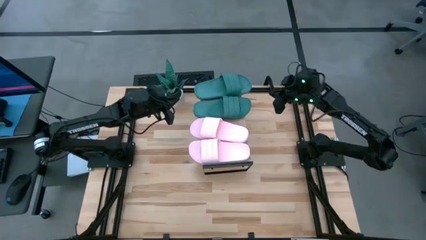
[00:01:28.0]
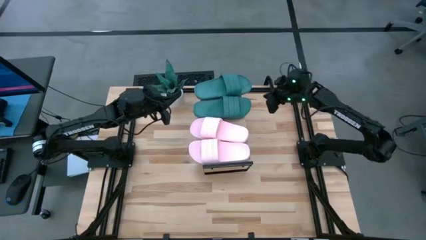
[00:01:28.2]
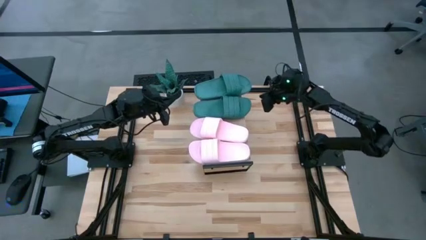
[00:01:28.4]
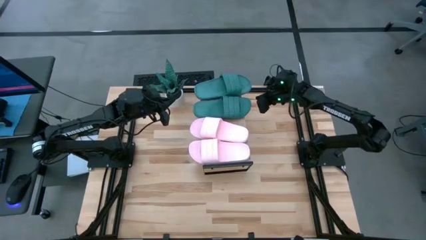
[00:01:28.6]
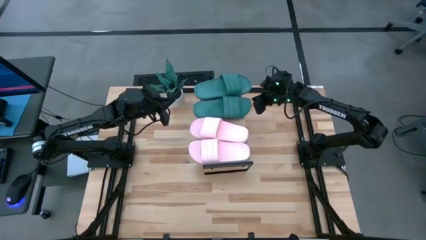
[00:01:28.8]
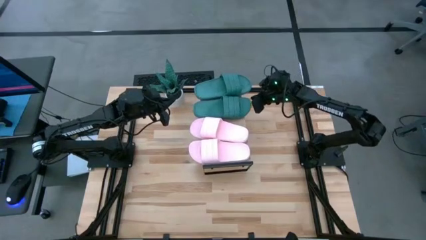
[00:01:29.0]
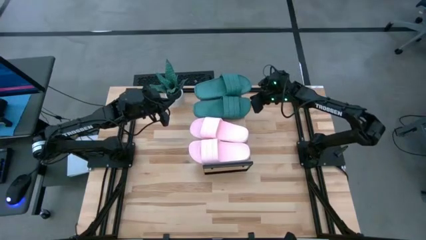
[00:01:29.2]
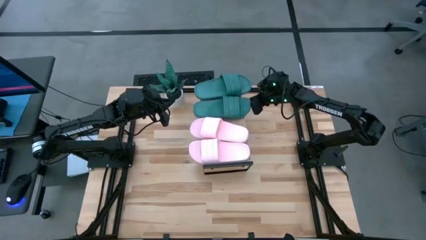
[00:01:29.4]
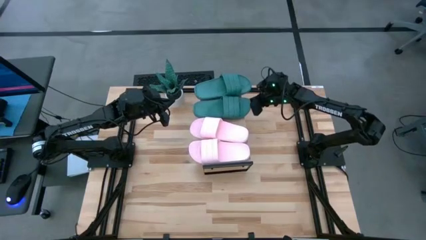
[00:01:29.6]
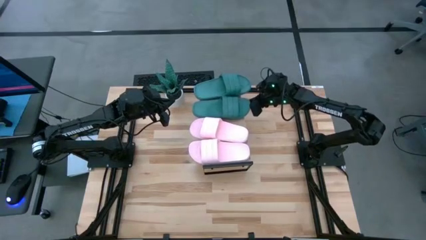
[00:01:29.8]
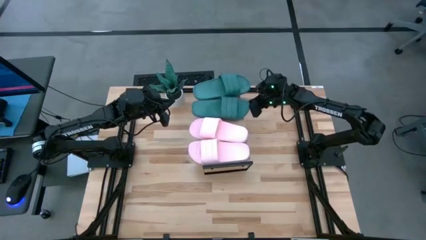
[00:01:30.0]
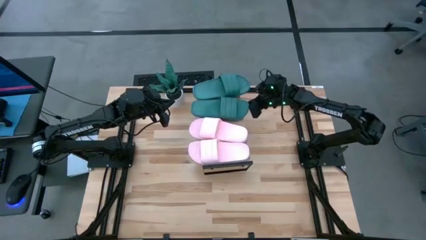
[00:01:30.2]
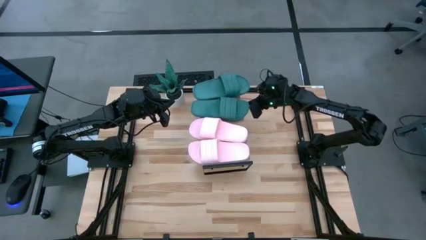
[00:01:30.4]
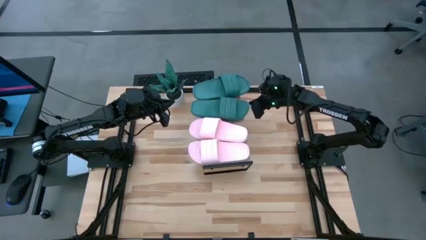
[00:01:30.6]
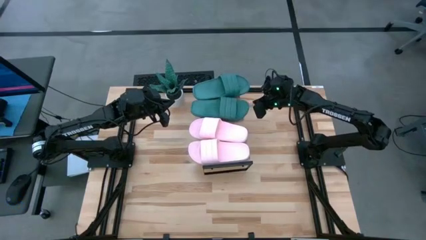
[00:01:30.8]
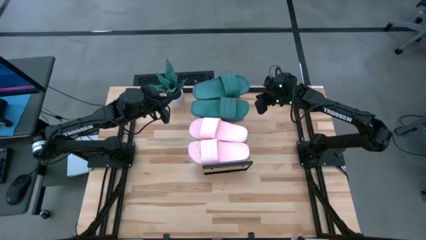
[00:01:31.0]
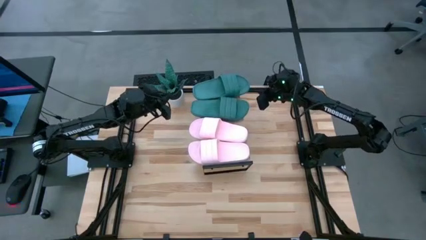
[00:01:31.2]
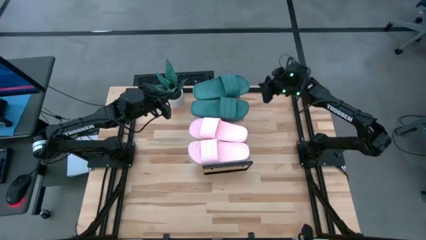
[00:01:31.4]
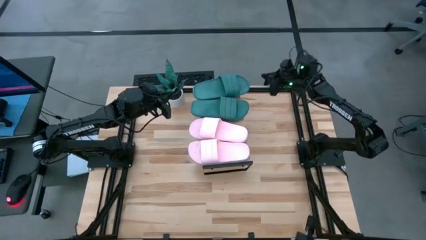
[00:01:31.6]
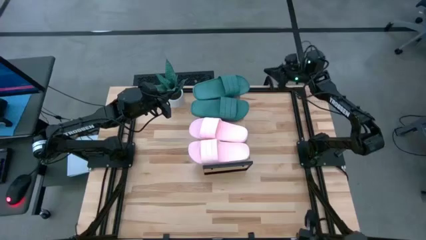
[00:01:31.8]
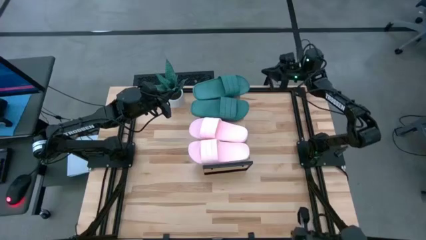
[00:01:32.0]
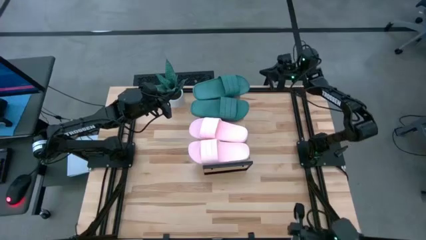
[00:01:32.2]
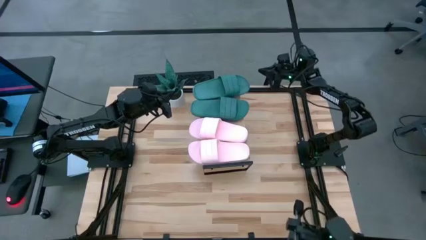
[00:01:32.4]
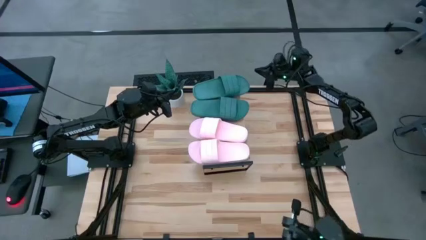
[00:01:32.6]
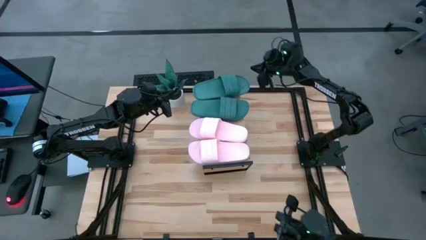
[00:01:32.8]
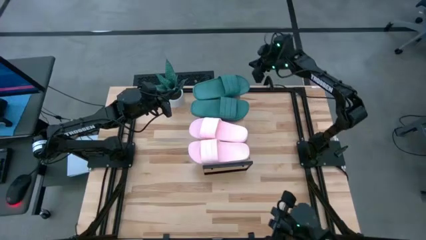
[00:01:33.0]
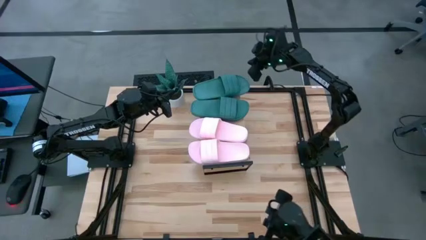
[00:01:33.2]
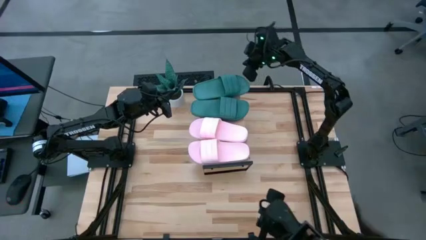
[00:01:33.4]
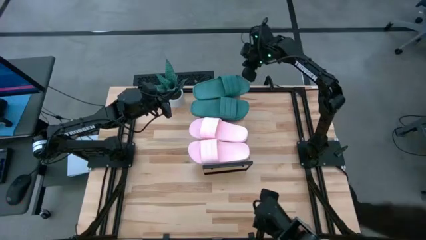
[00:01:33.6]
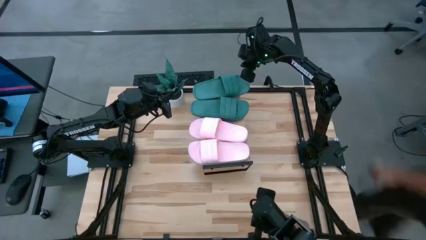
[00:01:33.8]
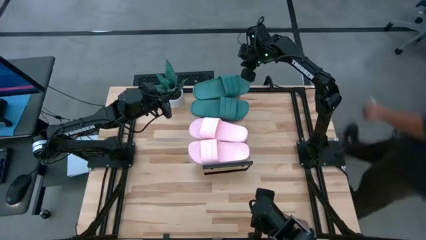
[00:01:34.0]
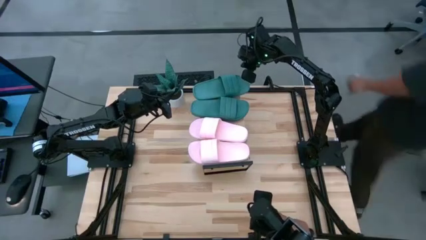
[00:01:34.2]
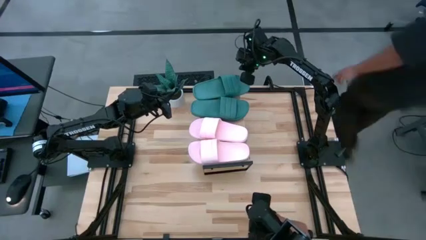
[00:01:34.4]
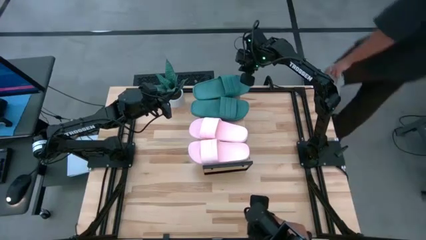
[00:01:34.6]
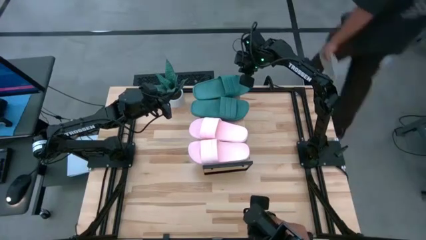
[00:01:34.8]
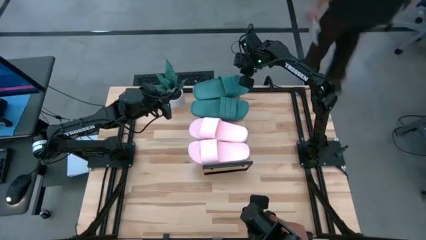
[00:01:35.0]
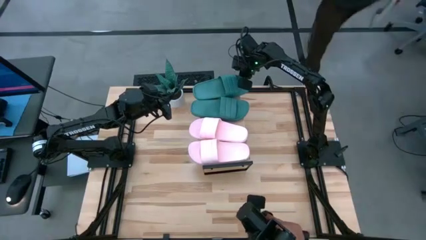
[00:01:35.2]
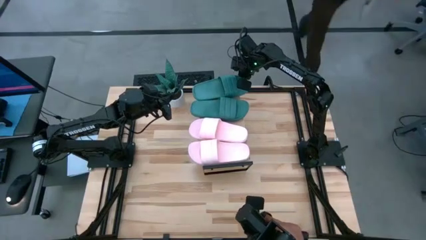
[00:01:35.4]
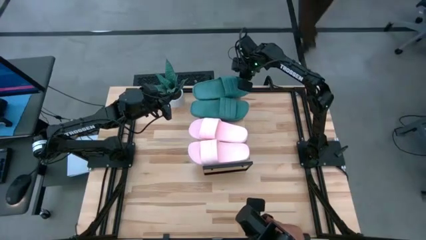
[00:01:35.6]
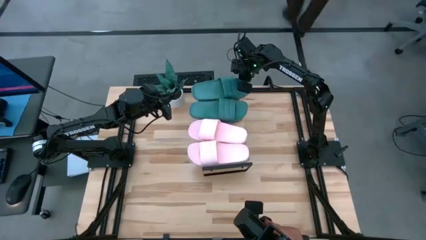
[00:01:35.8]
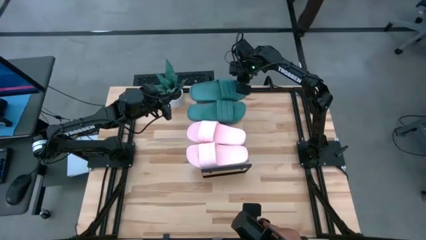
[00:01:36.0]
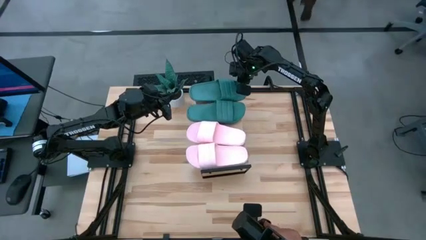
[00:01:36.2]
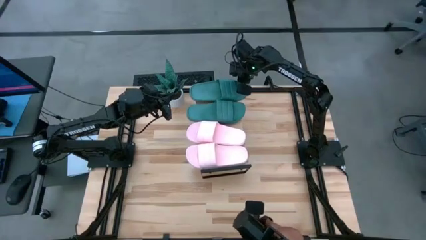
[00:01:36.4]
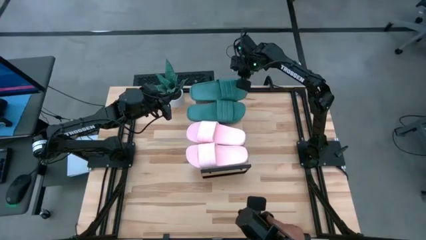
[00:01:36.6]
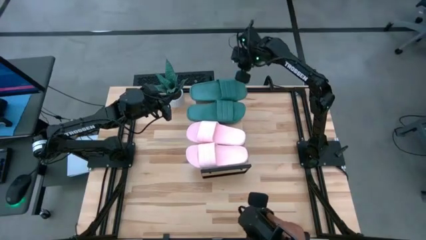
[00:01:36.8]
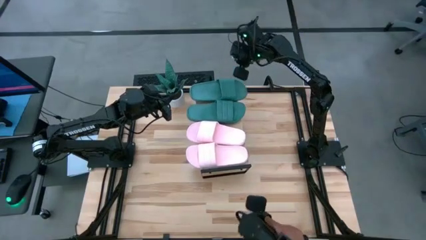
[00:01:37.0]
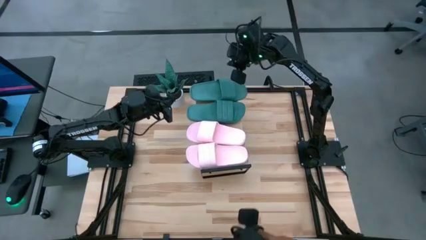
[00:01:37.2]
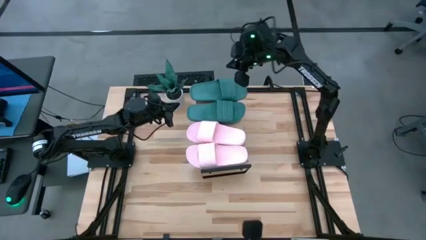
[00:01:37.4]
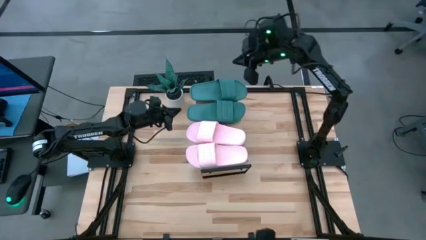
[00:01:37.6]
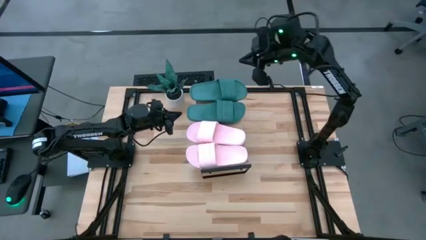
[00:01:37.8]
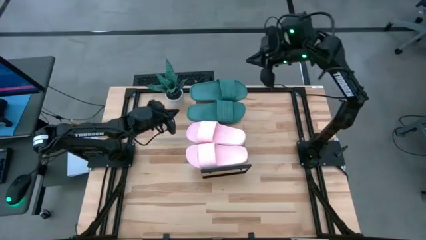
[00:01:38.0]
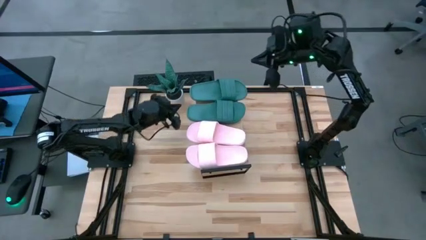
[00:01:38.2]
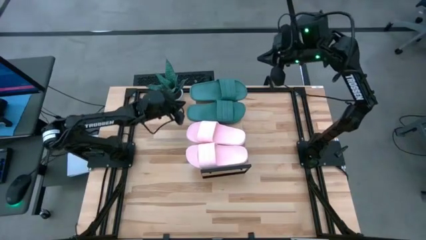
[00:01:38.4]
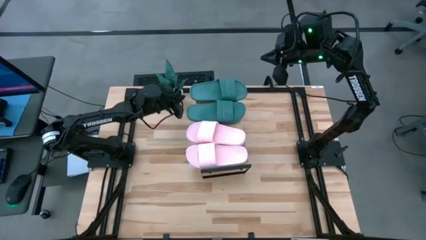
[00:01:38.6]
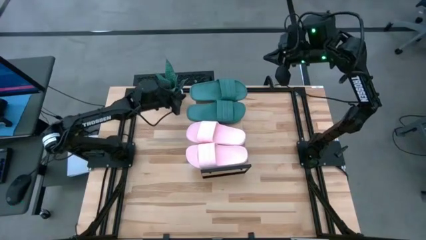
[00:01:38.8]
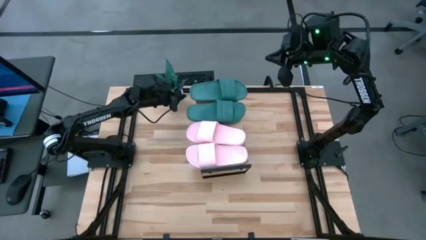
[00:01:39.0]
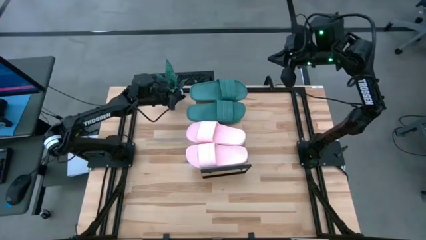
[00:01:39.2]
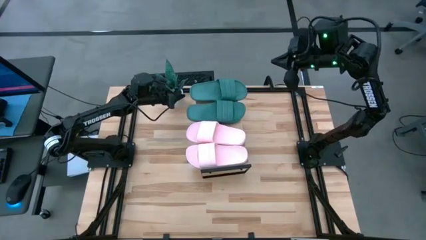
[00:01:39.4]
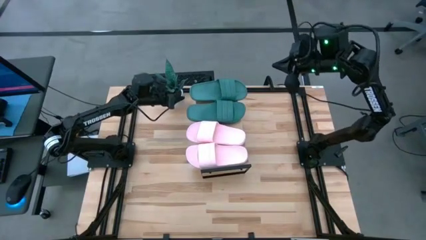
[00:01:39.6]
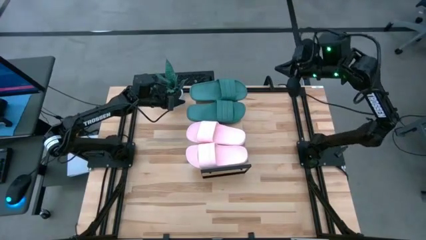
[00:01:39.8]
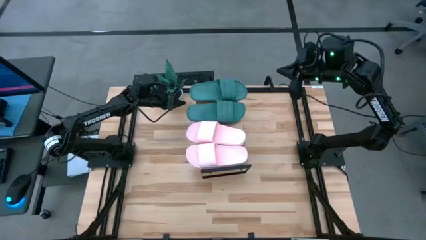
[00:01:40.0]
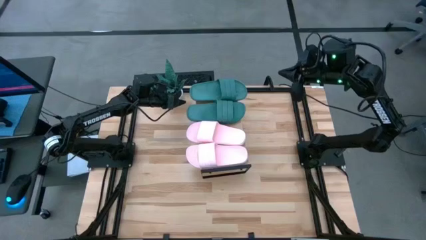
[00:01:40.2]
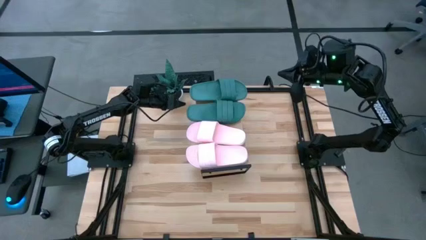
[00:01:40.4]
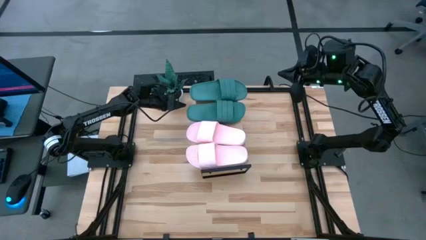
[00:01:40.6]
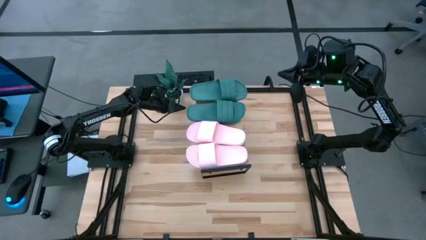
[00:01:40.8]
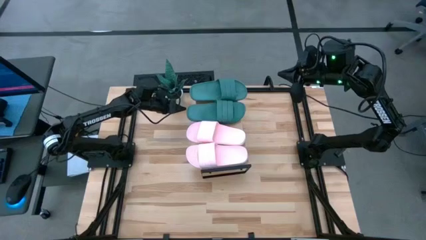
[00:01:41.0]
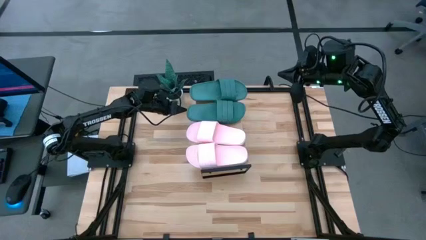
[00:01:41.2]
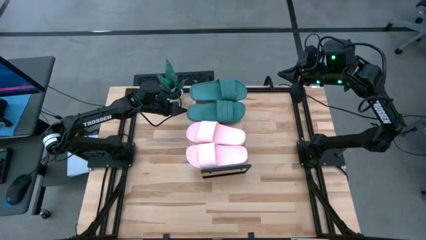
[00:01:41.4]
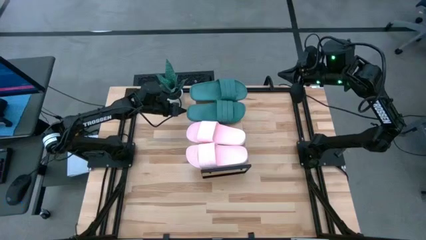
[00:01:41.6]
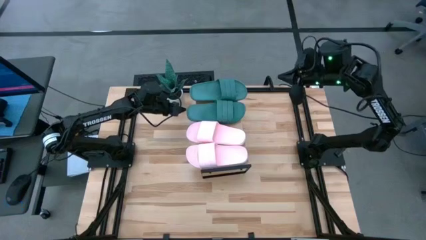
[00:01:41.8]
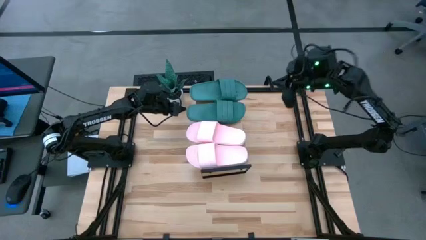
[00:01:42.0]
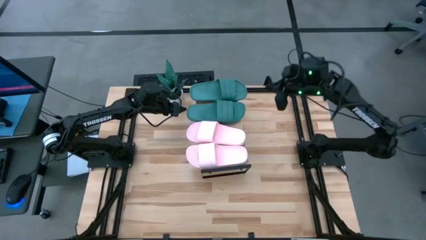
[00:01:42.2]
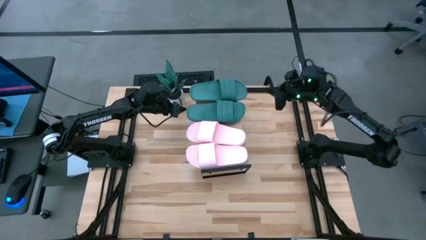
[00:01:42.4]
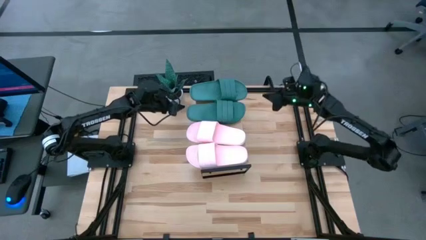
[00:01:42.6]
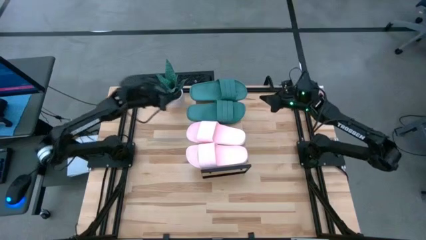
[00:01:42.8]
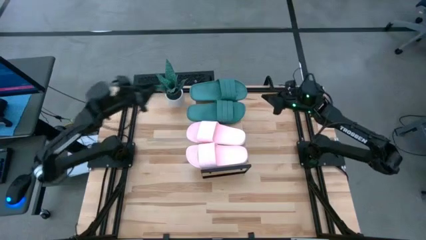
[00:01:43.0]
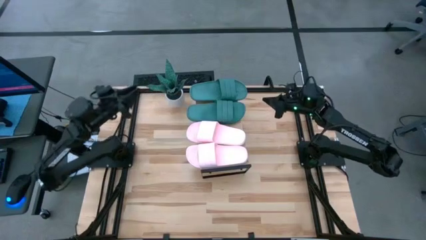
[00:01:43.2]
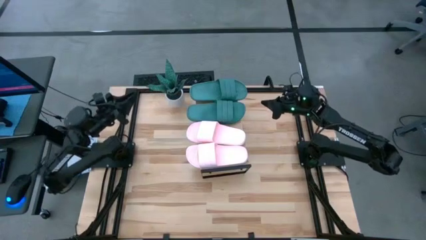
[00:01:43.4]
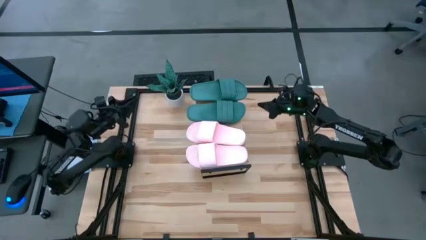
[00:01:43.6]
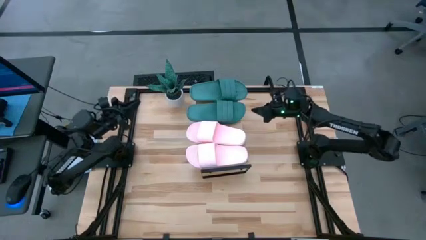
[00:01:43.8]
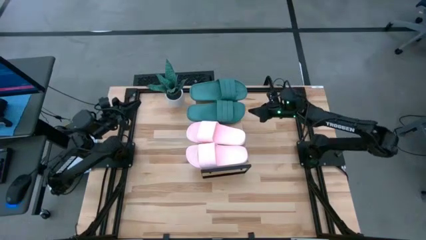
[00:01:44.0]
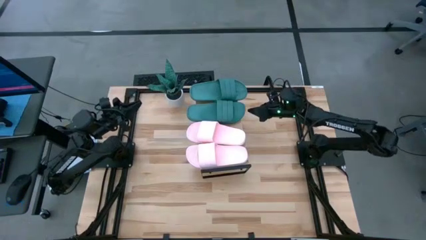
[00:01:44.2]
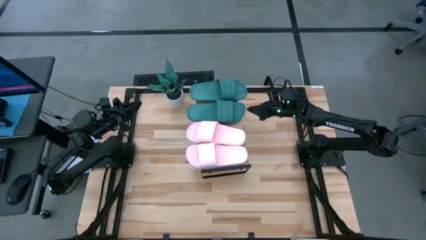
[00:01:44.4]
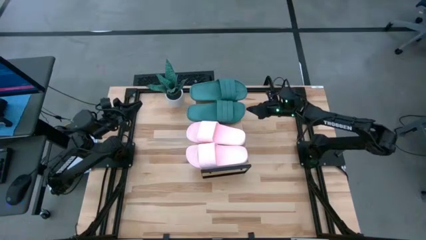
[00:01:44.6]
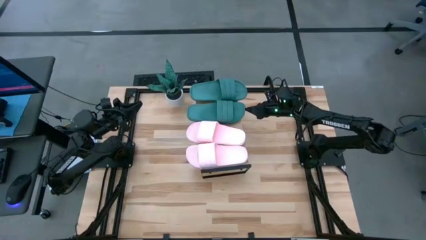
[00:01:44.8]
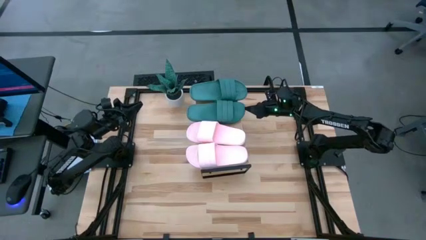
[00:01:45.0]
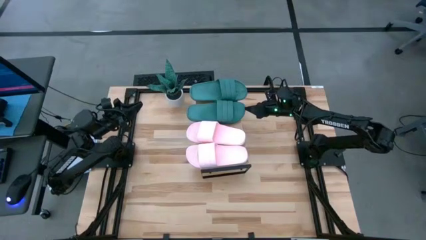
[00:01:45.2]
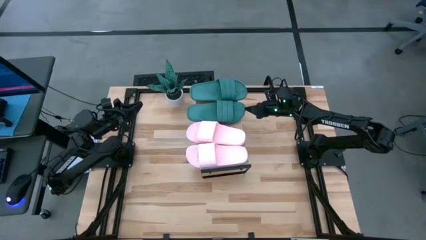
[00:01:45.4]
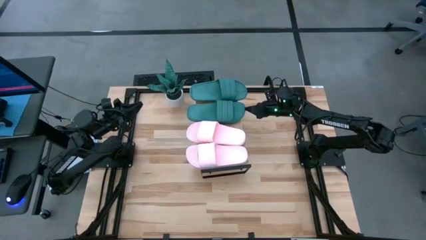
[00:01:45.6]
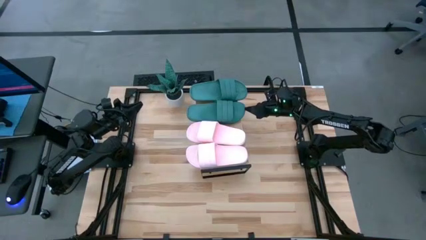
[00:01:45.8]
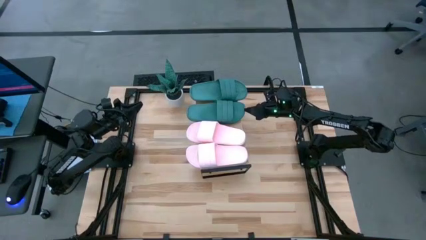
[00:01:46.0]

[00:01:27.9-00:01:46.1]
Task: Pick and place slides into the shelf
Adjust the slippers on the shelf
